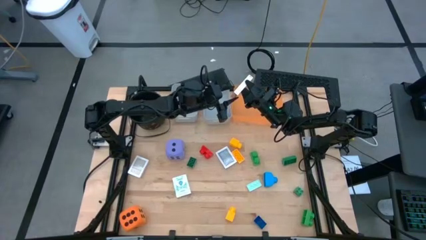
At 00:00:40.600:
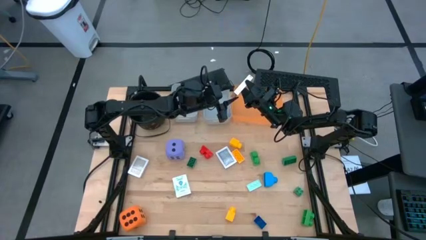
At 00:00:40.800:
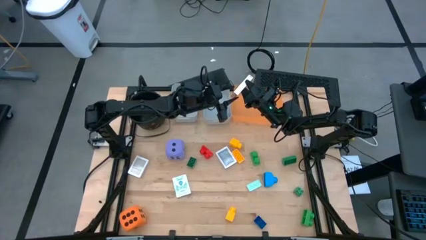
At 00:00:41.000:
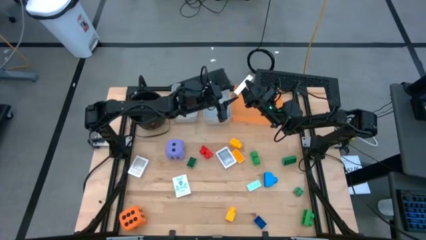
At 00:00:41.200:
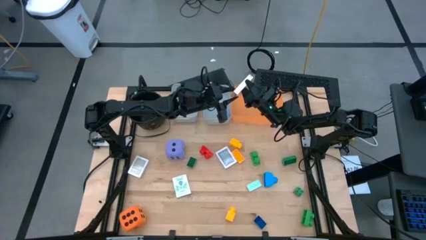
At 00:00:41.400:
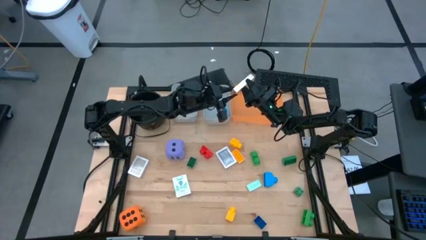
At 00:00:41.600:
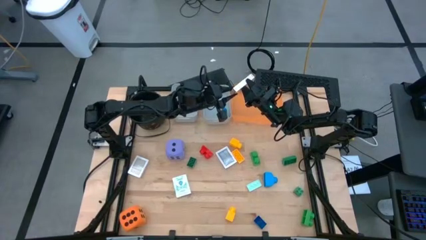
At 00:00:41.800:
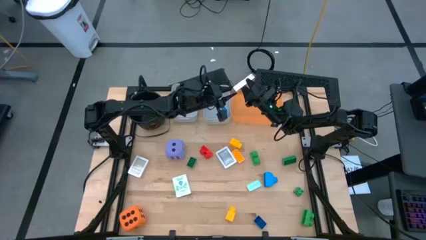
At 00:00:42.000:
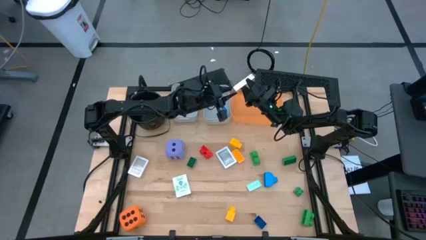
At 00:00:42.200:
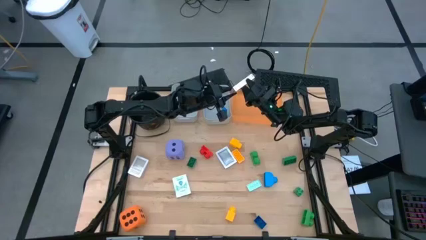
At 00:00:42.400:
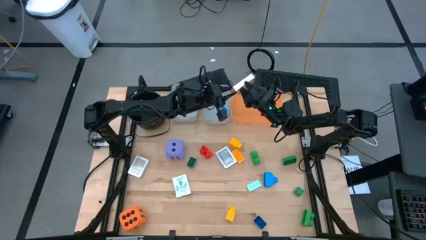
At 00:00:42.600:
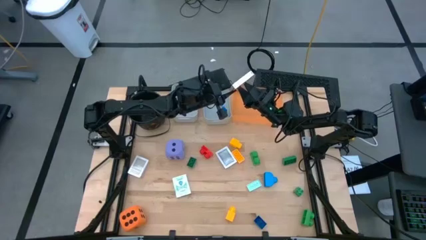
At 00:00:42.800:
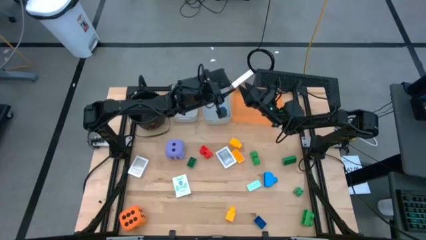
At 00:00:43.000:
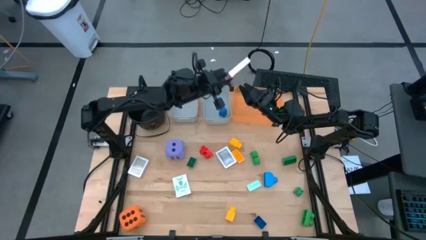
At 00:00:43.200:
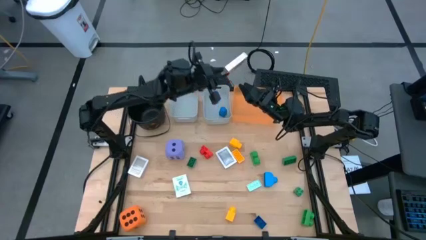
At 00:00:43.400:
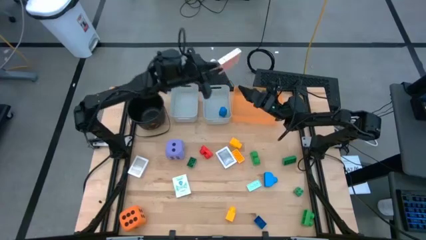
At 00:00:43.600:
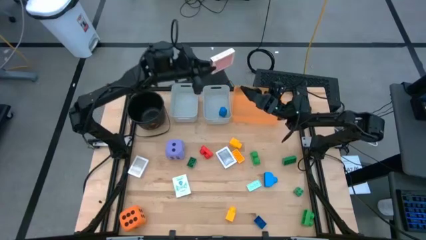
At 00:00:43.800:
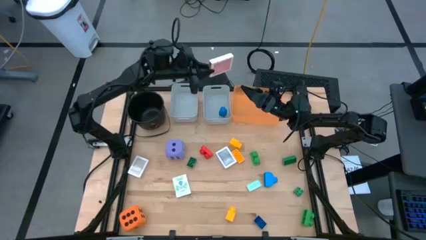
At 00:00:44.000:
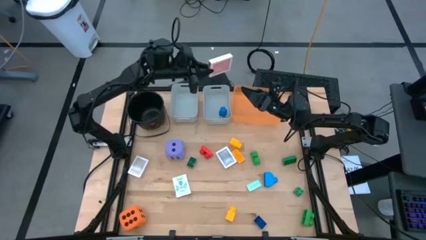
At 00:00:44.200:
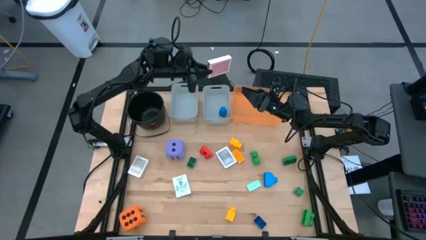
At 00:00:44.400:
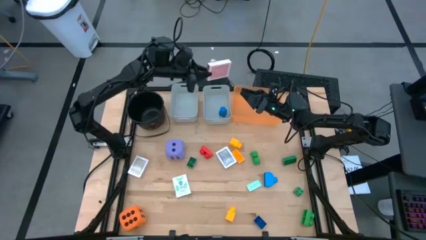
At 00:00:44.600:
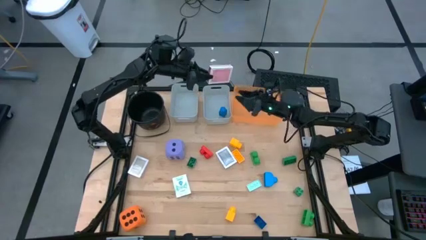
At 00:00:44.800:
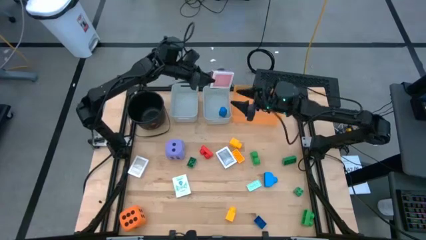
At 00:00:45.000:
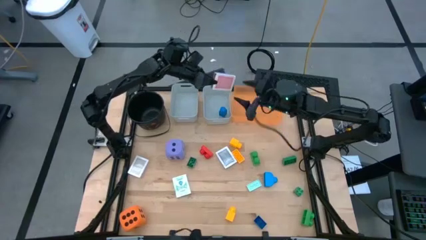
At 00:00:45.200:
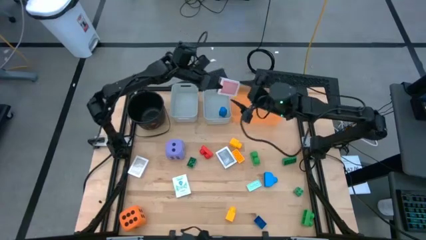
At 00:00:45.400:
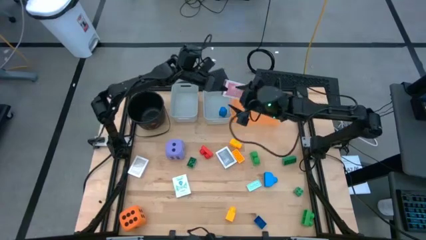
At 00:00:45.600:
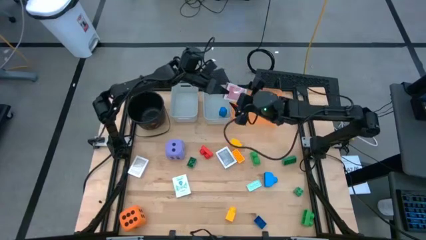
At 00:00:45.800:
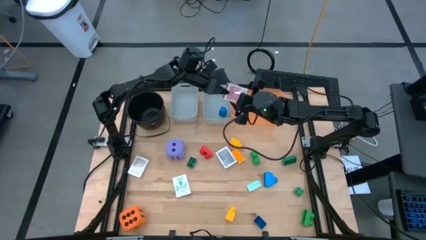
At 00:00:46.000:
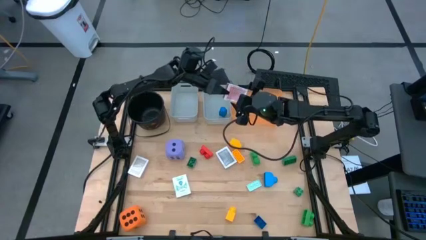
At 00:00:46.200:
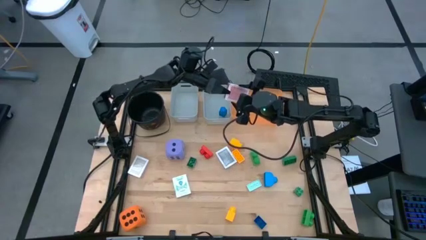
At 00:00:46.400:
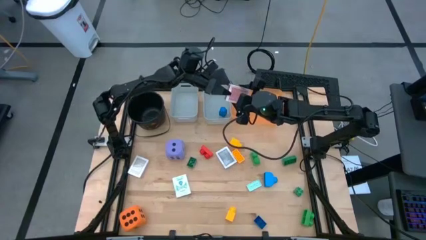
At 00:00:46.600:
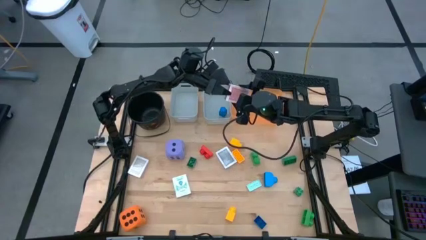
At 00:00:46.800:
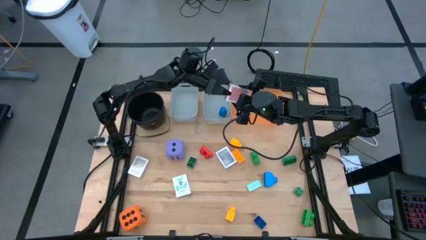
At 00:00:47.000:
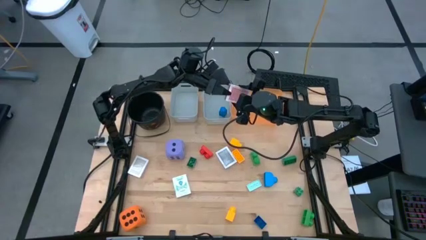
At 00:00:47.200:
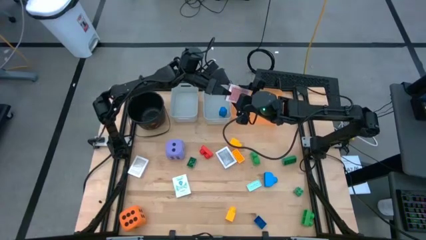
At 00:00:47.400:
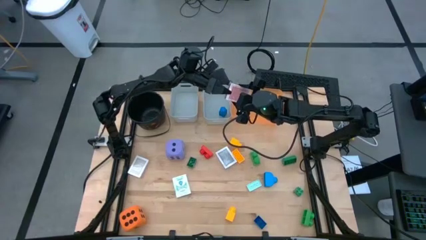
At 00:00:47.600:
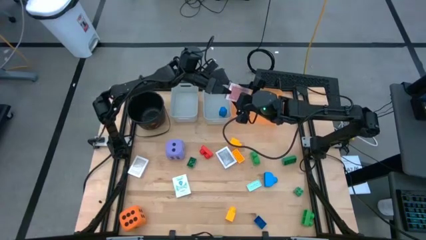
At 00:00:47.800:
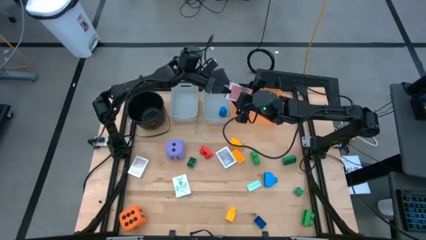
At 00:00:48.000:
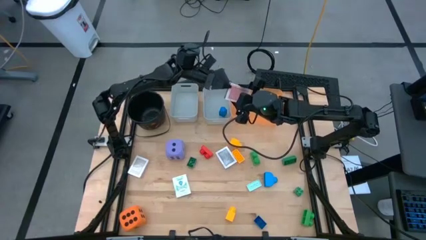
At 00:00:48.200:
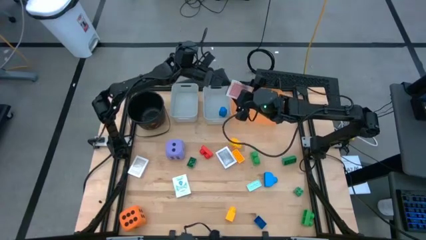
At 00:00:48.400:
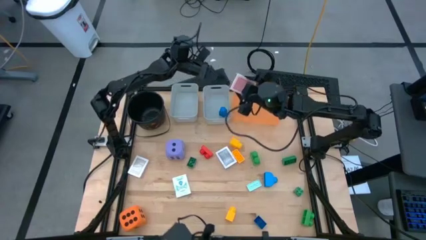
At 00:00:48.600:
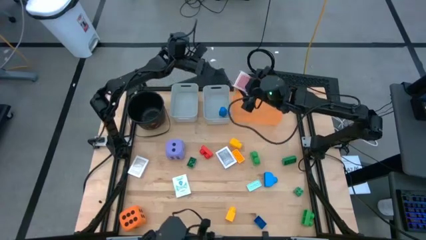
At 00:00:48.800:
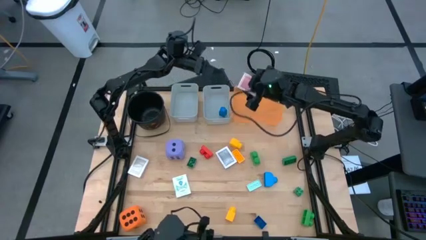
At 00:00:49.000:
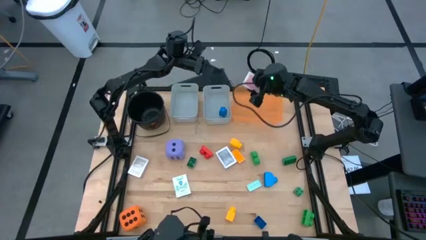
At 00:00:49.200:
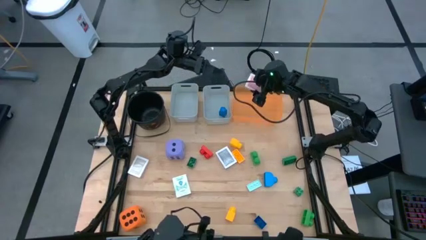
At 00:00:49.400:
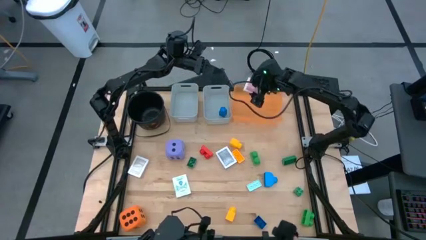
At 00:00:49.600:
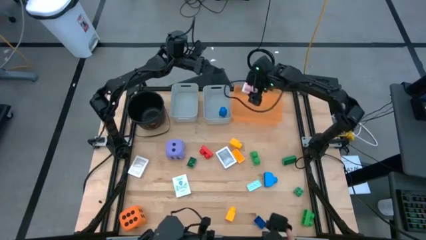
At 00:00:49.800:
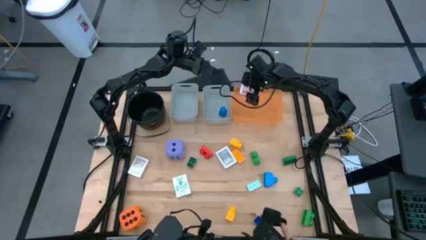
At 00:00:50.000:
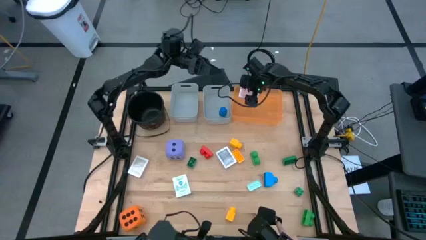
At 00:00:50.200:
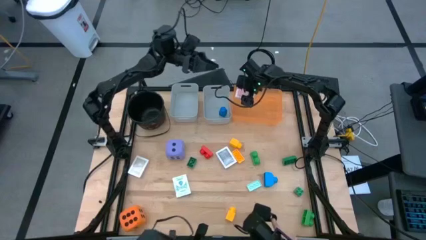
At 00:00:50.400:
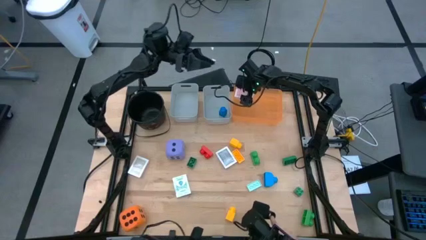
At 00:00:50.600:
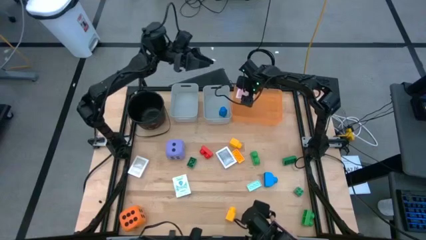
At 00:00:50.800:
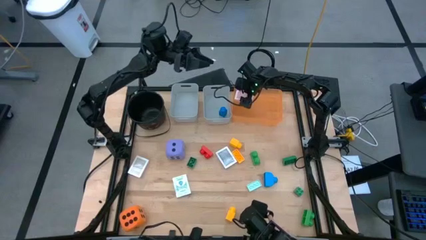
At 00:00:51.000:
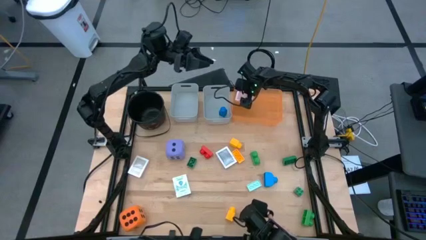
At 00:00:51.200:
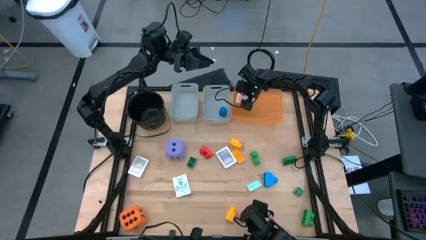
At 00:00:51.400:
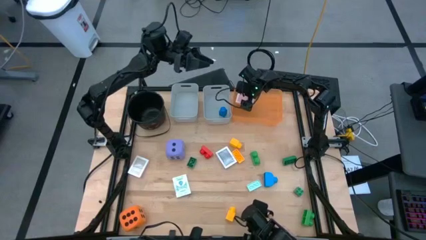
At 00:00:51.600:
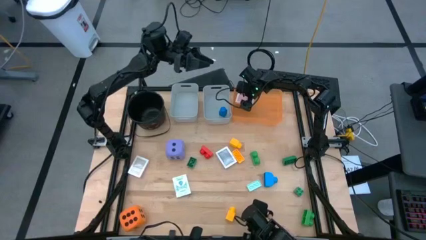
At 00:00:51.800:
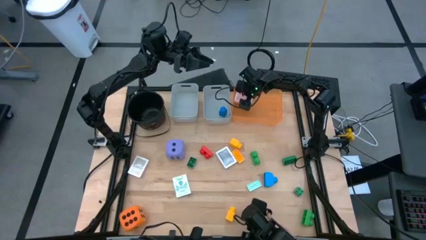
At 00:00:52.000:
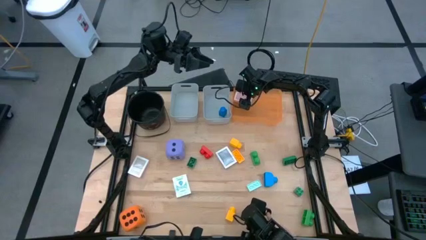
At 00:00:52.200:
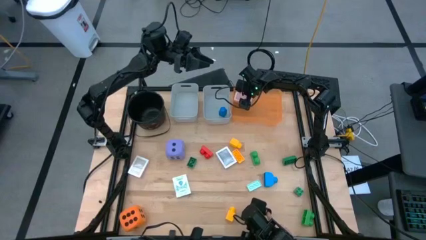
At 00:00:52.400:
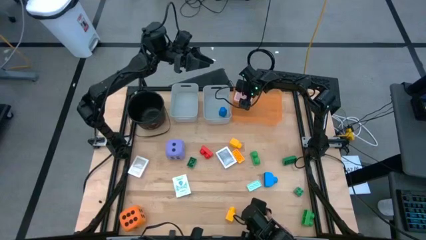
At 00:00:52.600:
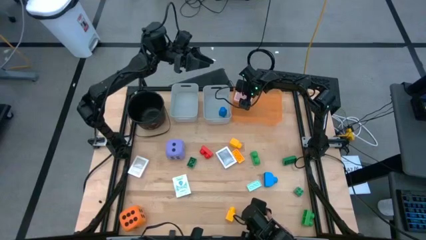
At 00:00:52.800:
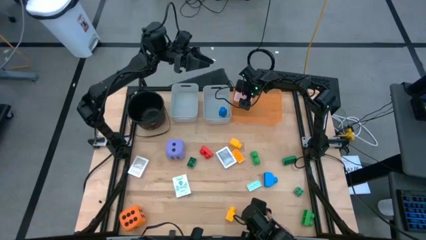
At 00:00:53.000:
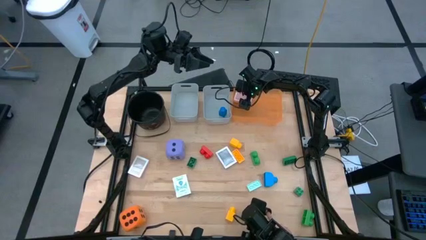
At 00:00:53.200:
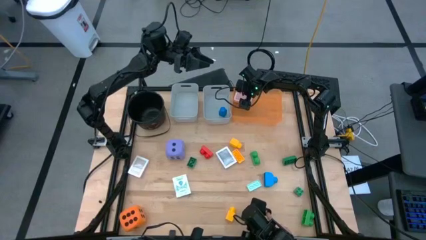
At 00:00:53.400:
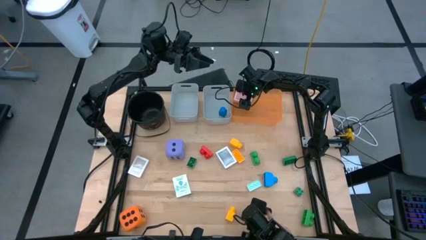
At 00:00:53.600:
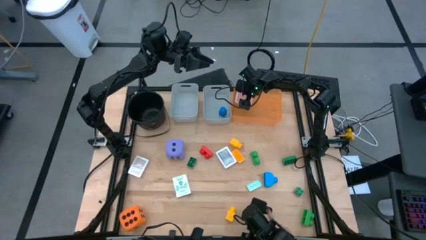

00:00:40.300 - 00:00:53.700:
Task: Pick & Place Toys
Put the red playing card into the orange bin
